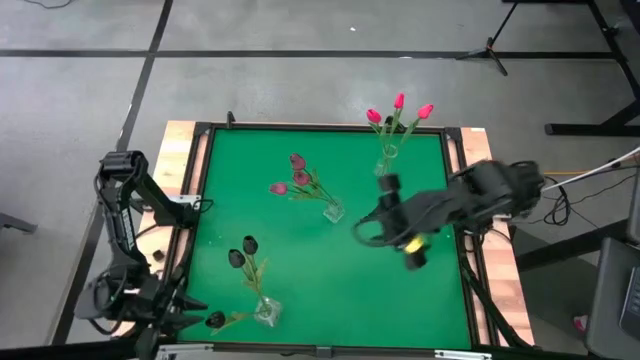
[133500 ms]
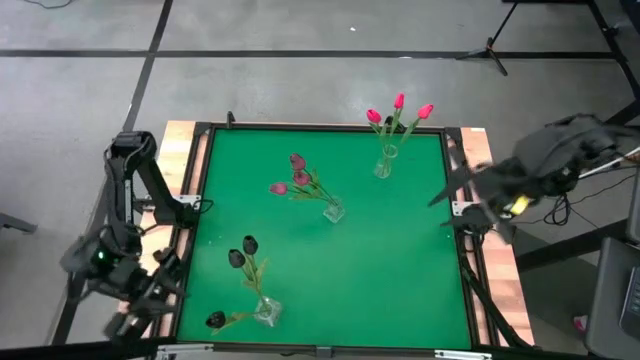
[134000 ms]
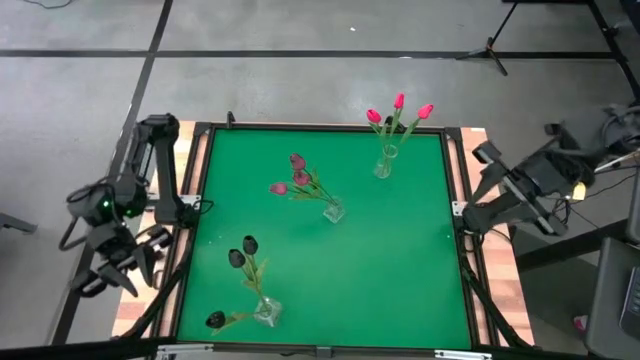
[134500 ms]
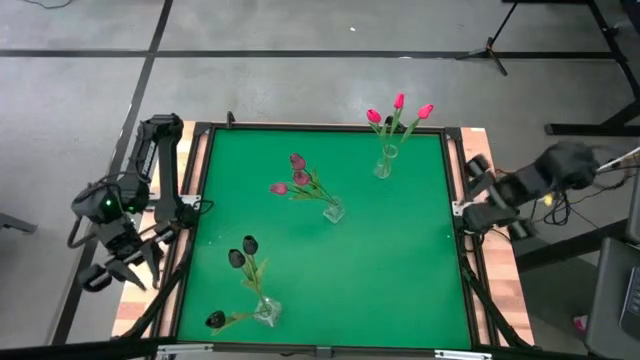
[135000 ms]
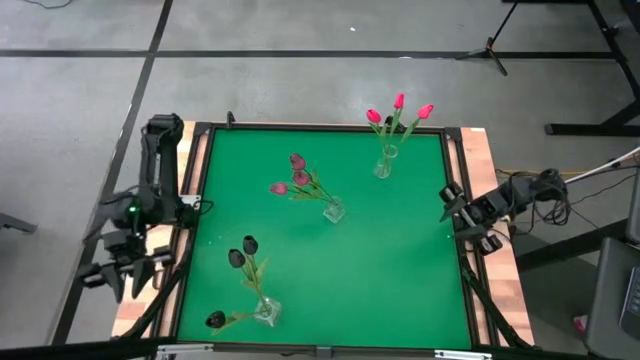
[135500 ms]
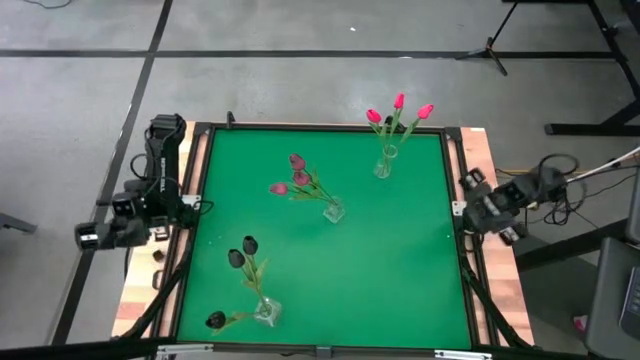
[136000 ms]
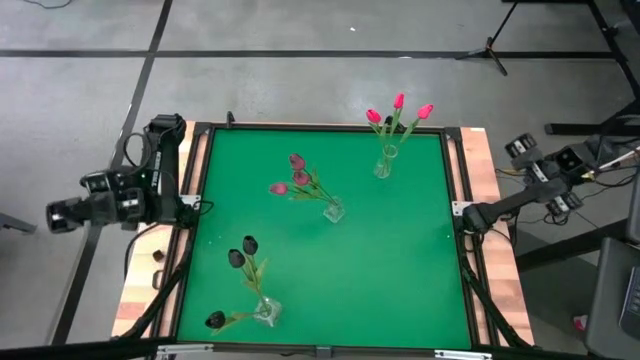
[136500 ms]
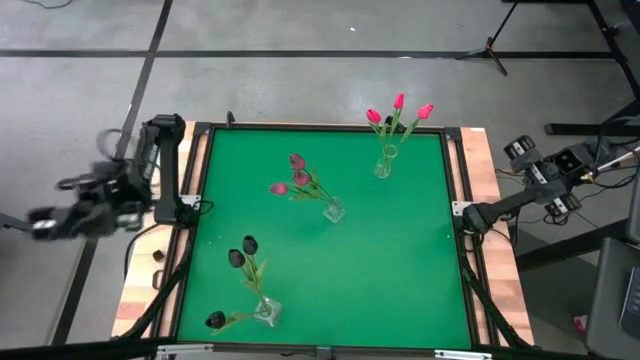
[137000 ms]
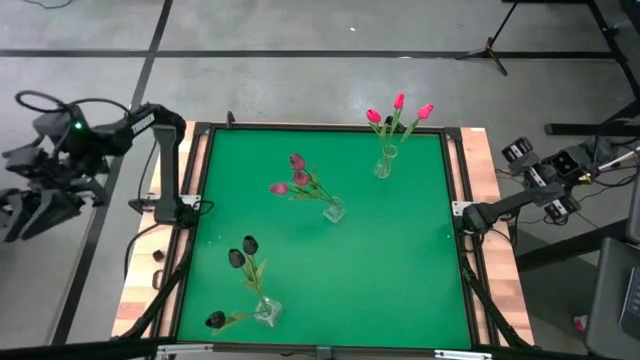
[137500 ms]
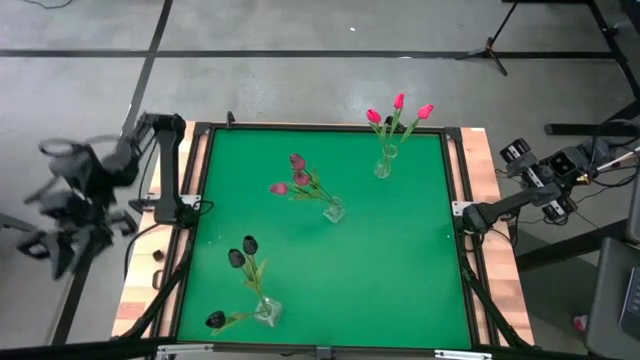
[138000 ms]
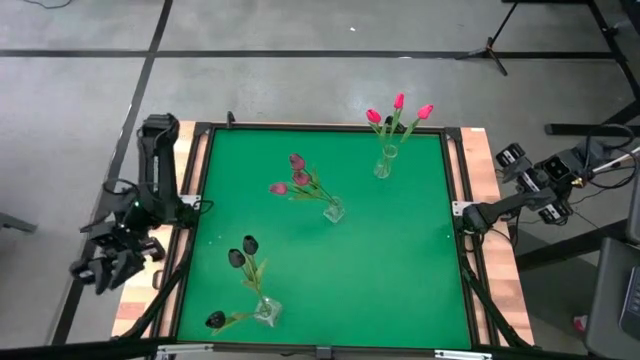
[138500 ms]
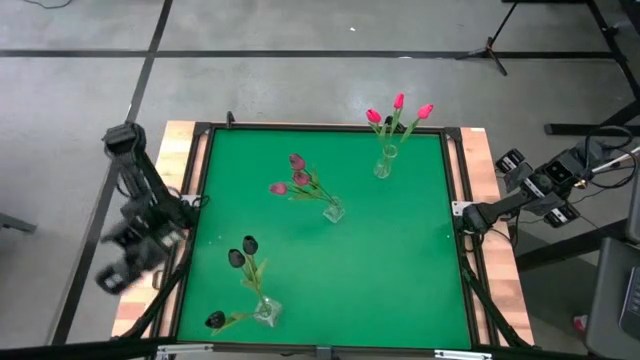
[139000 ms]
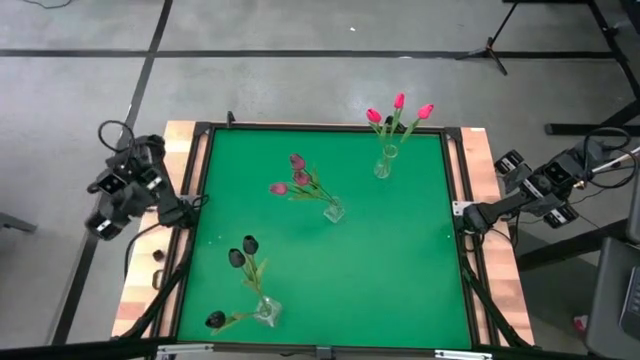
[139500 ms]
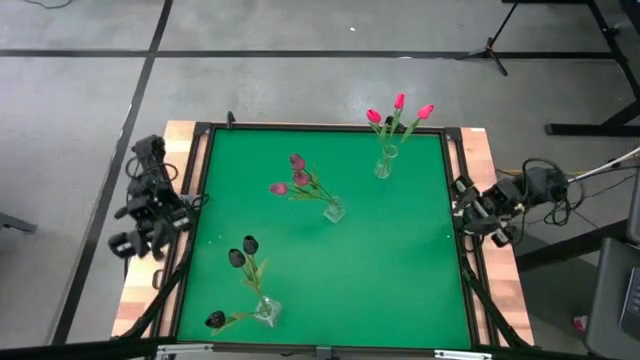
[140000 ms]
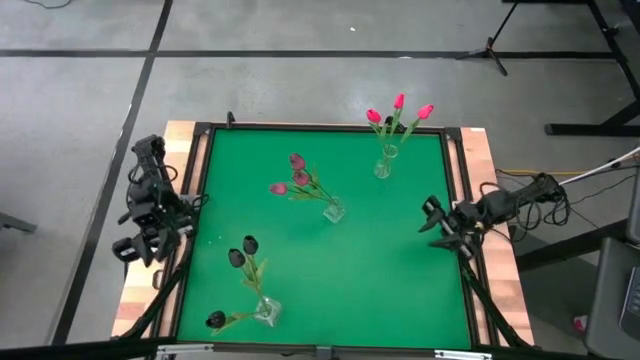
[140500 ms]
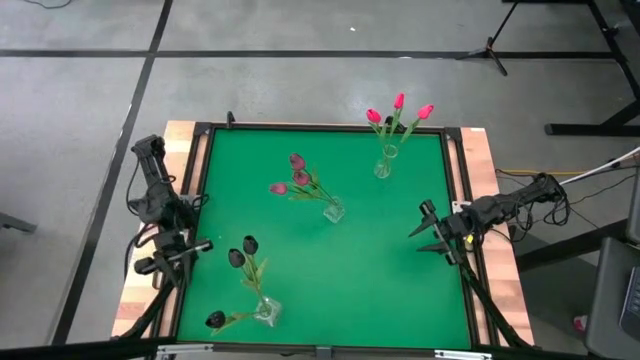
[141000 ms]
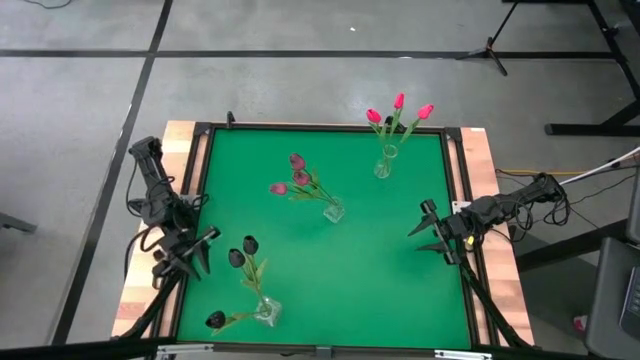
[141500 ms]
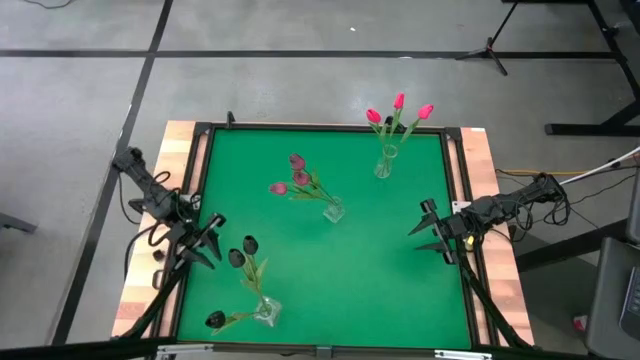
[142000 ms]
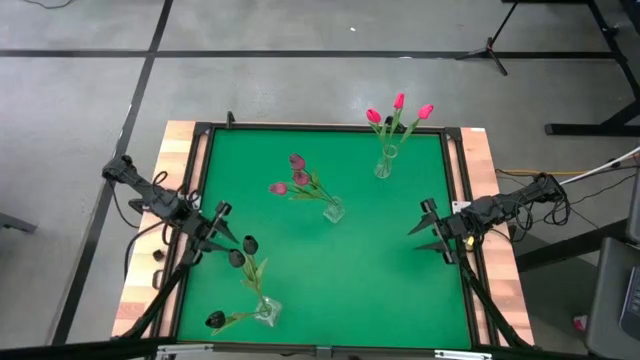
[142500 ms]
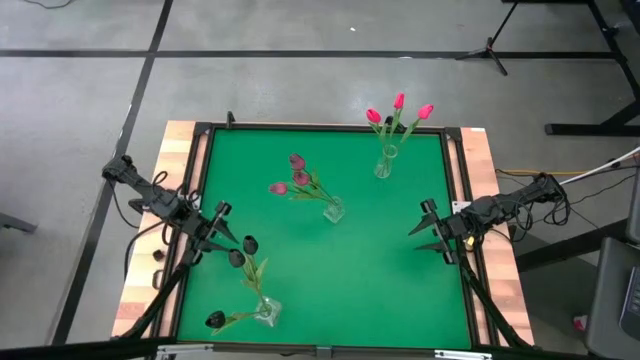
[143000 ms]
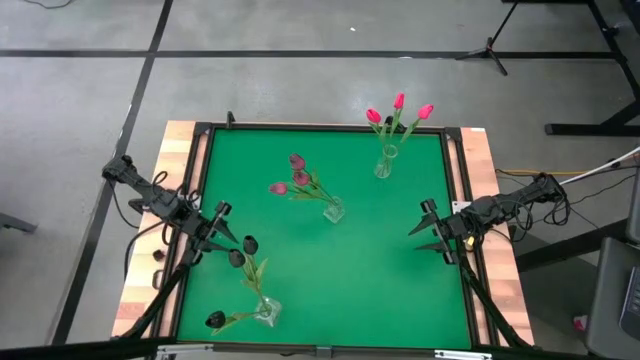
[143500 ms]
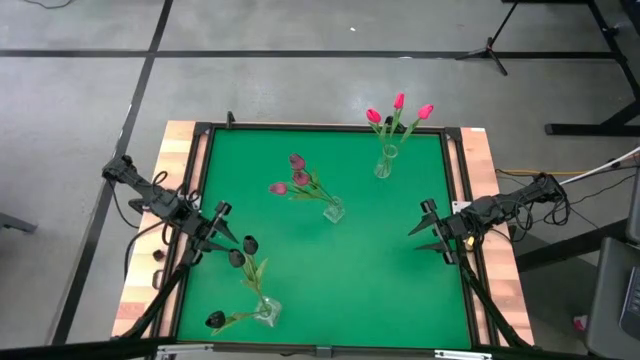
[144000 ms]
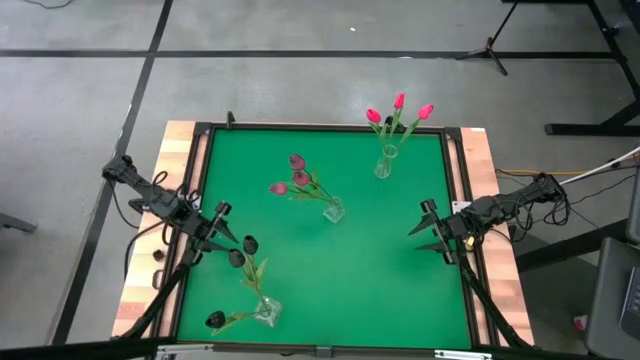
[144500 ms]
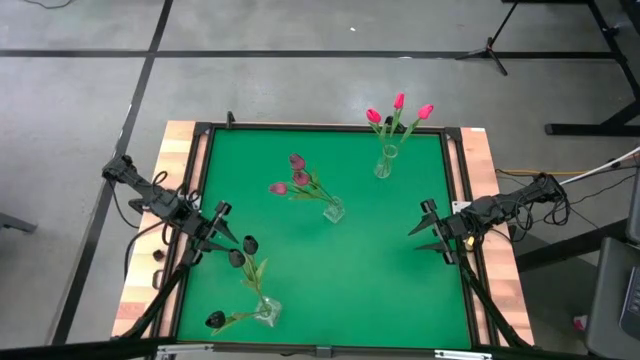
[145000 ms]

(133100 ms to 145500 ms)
Task: Sort flowers into vase by color
Return to Home Position

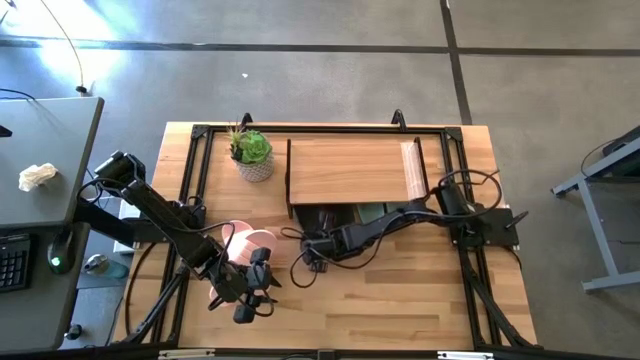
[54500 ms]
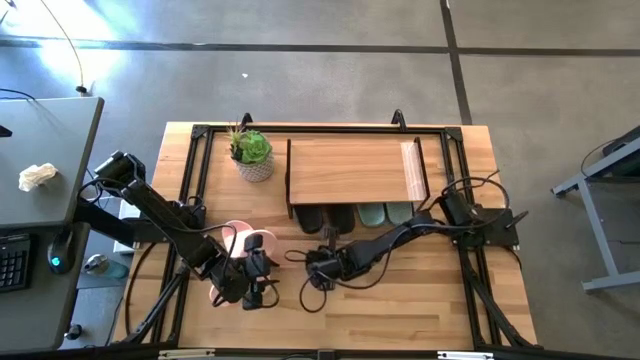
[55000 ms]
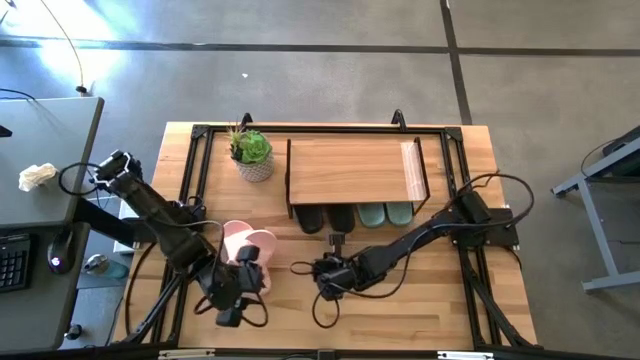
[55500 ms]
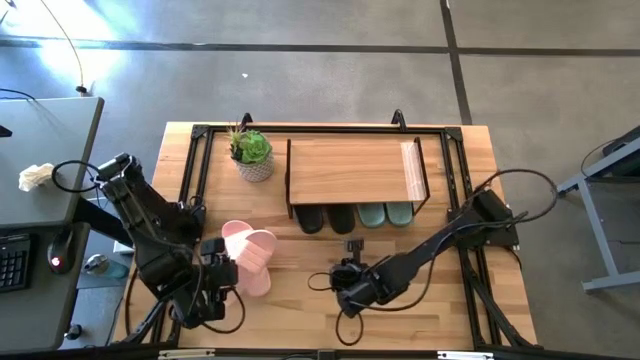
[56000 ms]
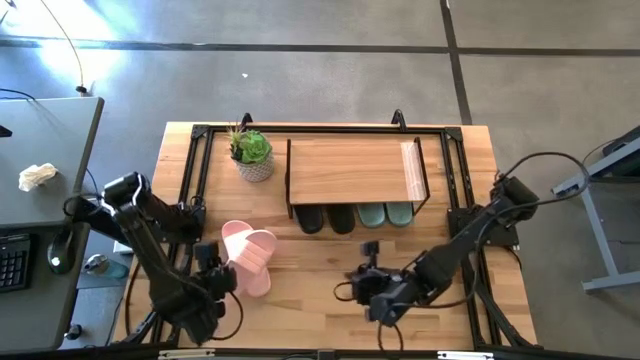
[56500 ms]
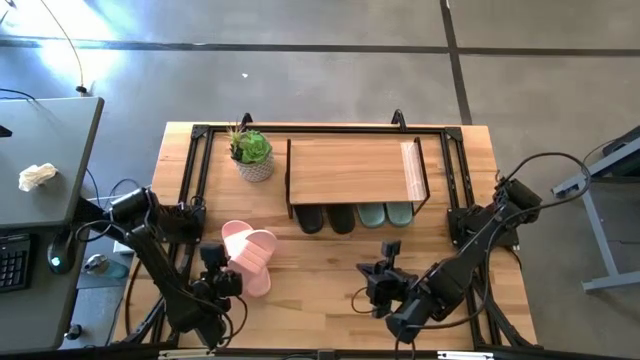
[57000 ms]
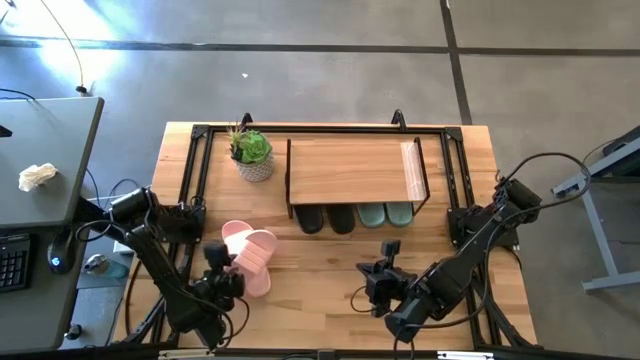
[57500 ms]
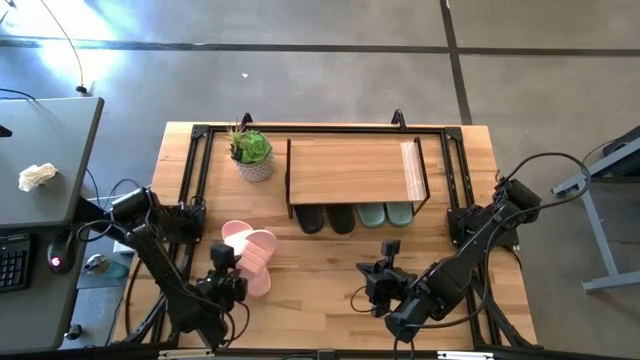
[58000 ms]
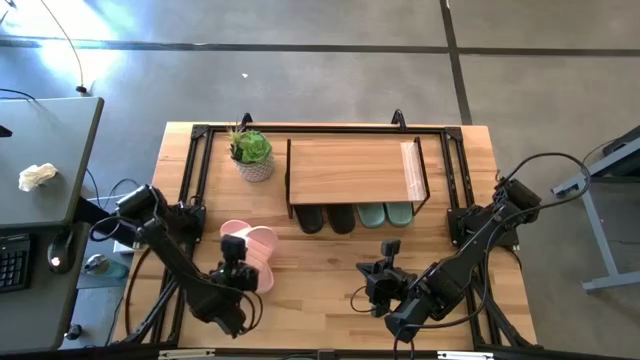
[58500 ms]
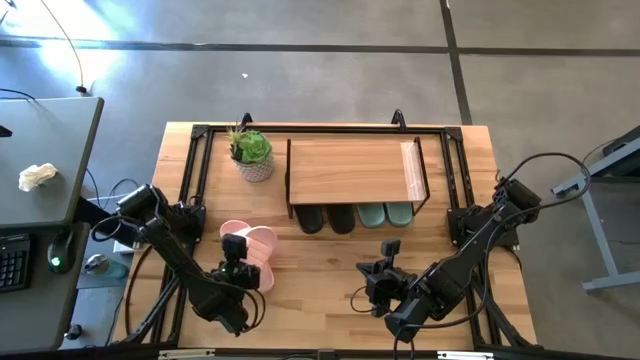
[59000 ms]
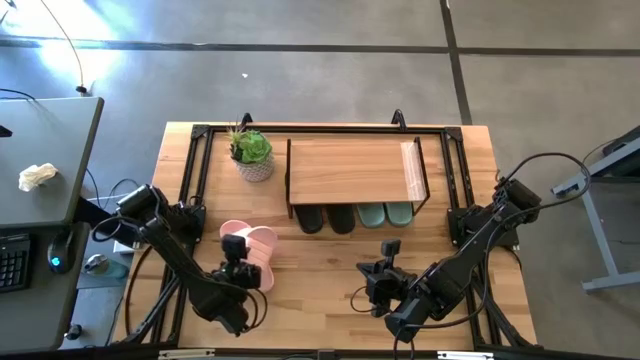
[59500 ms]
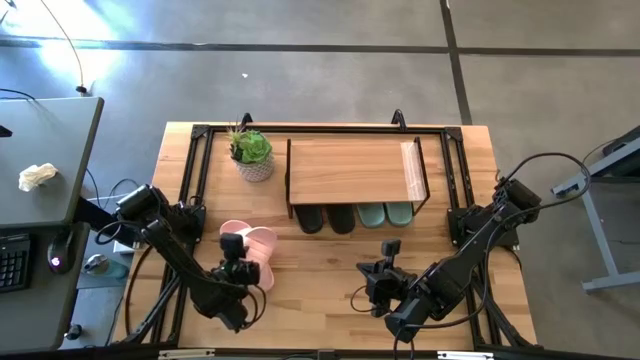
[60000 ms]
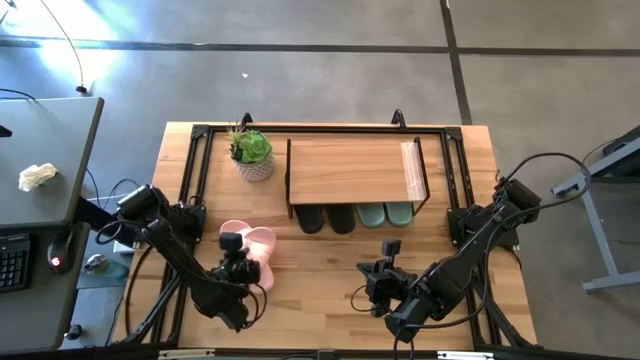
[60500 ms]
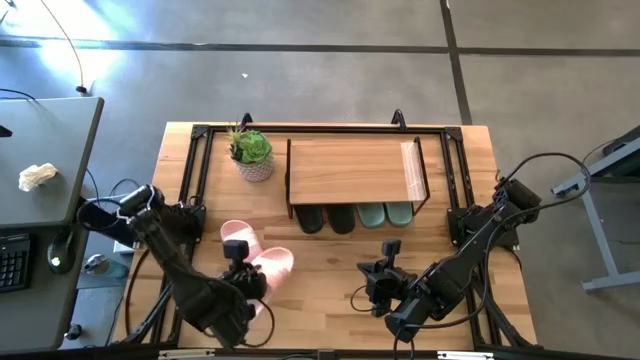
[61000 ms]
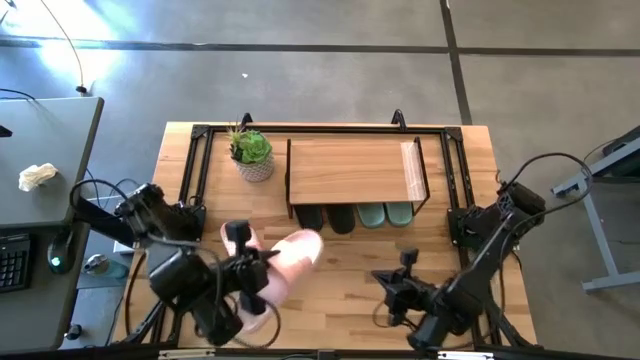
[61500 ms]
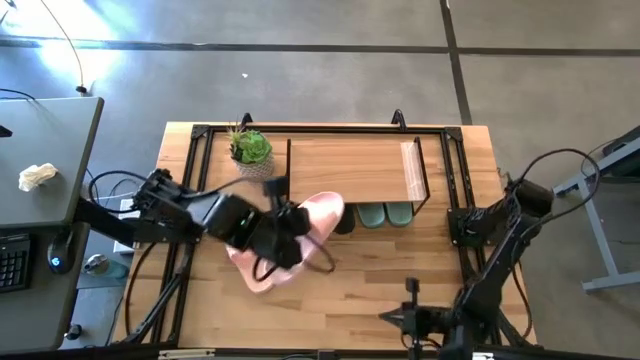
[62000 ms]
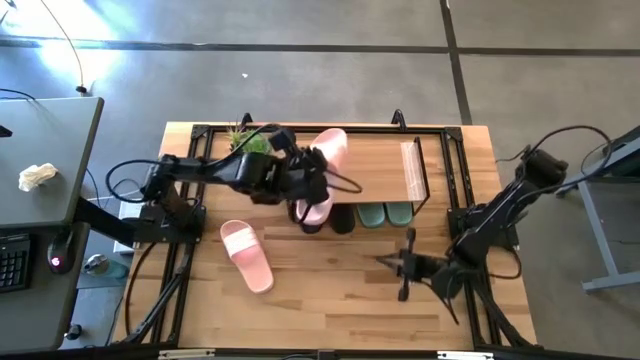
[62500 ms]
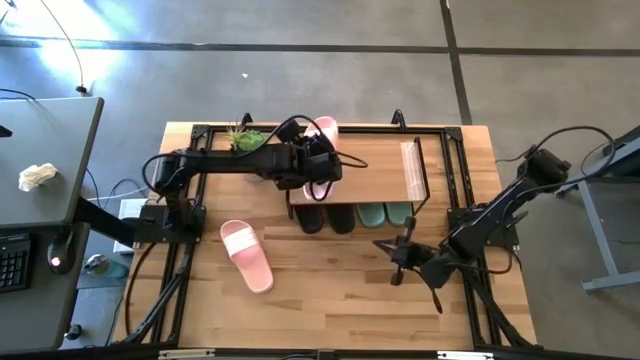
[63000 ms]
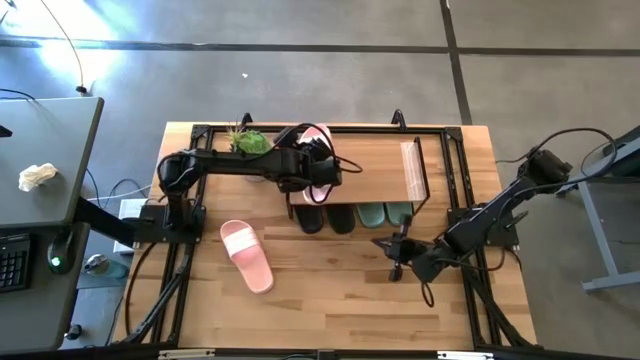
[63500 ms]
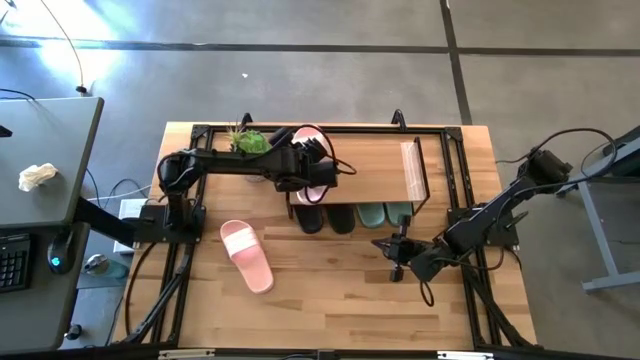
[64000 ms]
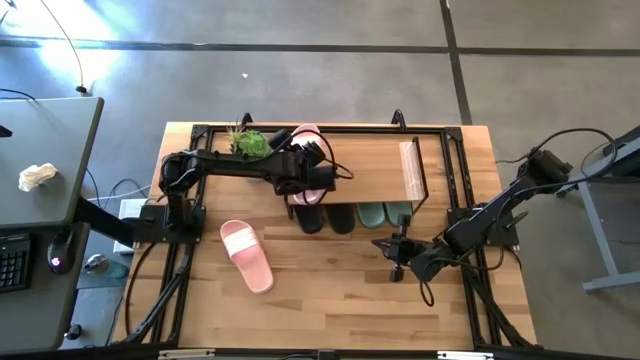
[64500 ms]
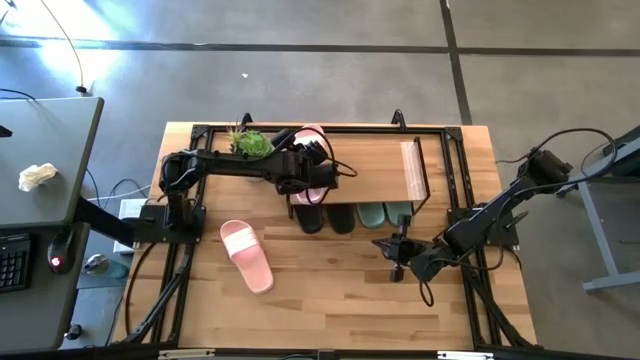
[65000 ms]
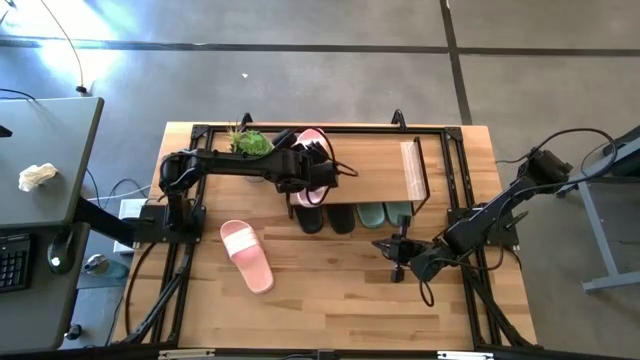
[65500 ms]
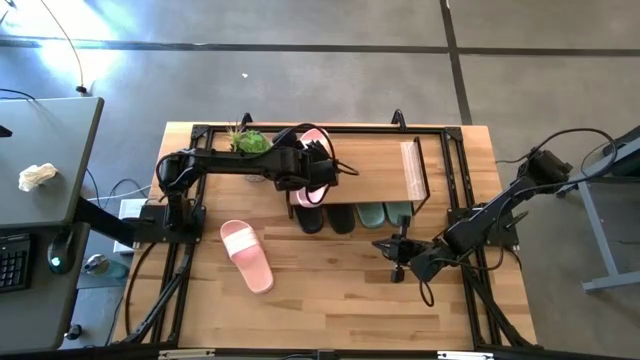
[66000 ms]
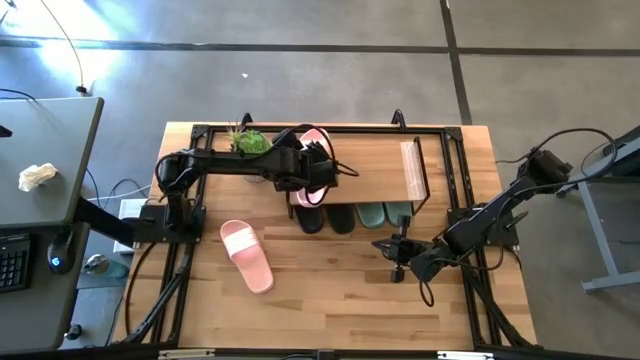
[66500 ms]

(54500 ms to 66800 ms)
Task: Pick and place slides into the shelf
Put the left pink slipper on the shelf
